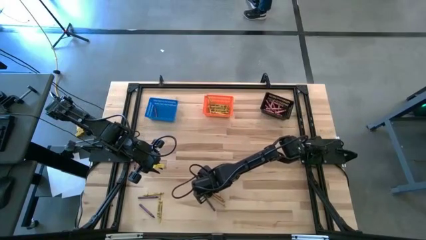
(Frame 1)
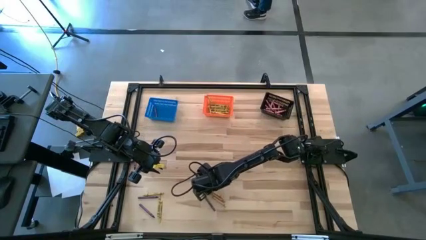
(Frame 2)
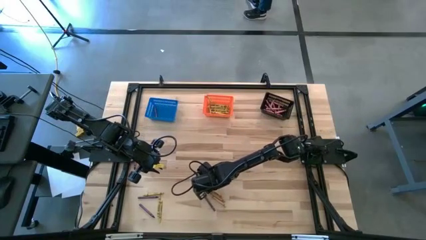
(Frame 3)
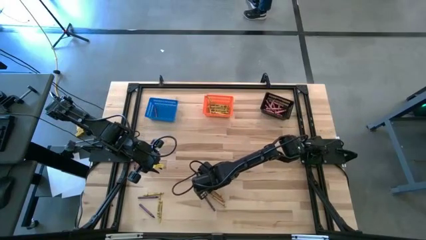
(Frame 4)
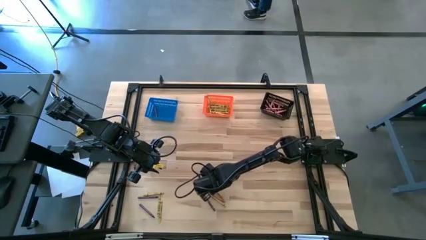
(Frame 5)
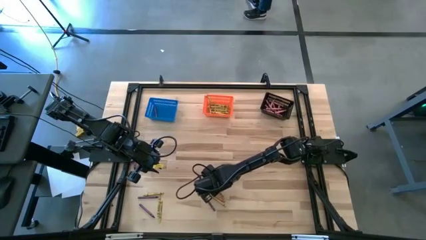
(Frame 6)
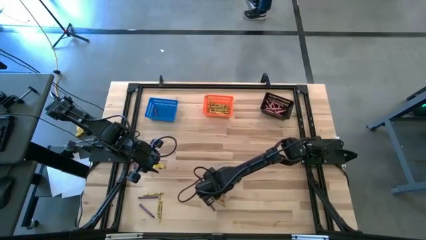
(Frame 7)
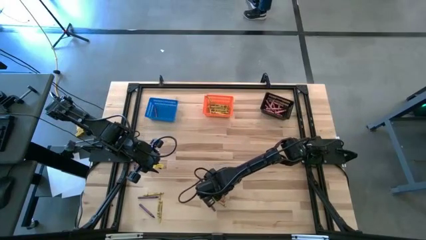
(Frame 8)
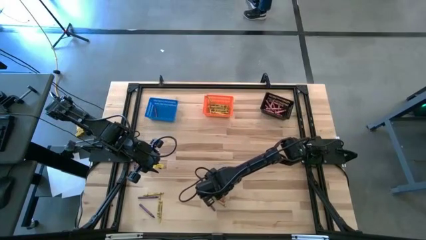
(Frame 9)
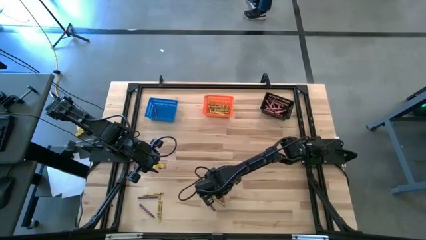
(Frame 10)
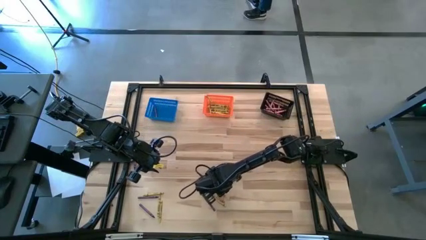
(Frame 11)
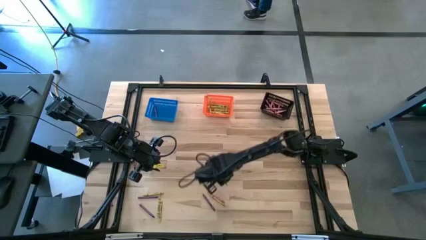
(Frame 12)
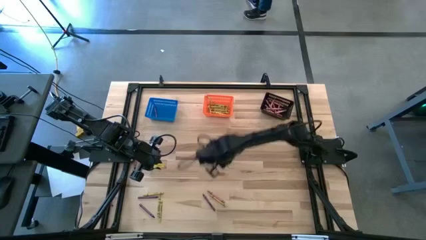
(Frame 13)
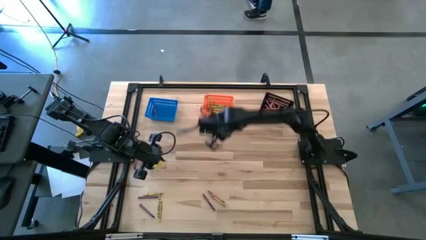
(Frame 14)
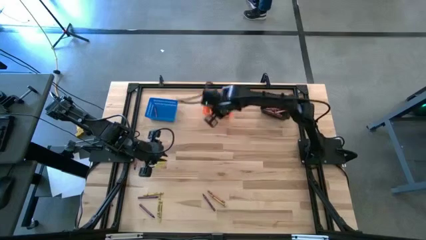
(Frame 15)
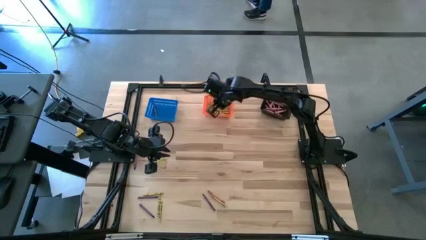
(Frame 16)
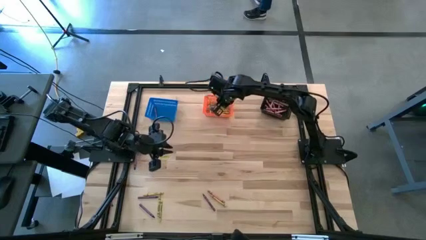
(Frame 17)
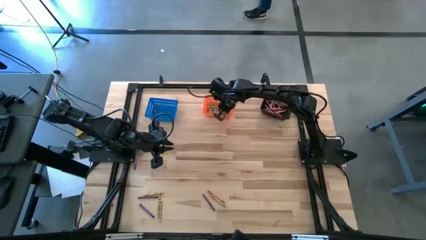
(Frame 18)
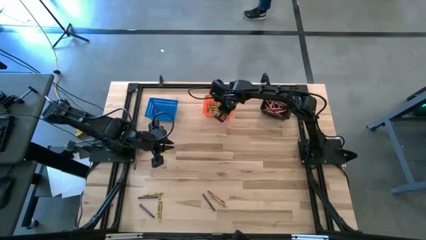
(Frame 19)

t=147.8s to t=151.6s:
Task: Sort crayons
Put the yellow crayon into the orange bin

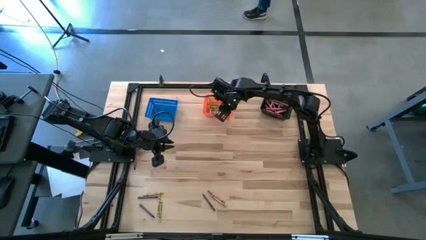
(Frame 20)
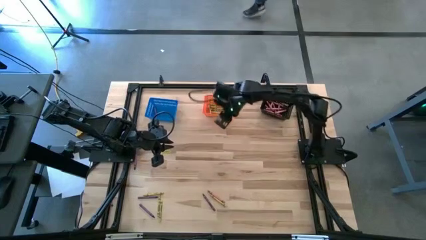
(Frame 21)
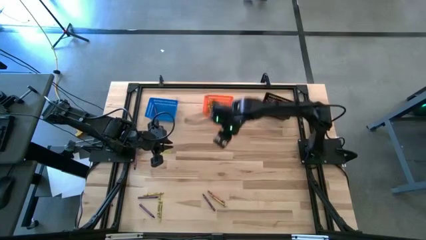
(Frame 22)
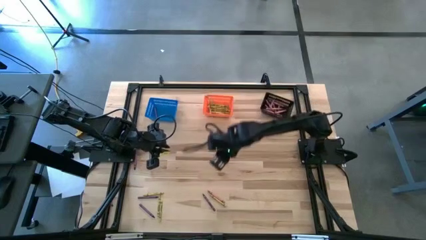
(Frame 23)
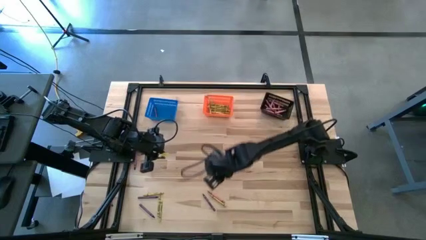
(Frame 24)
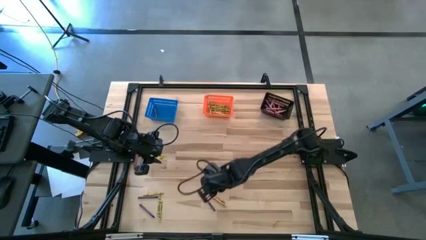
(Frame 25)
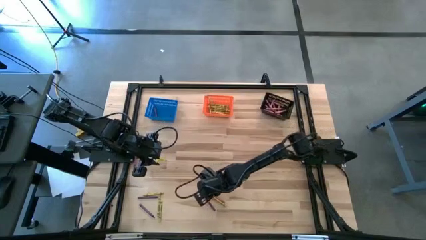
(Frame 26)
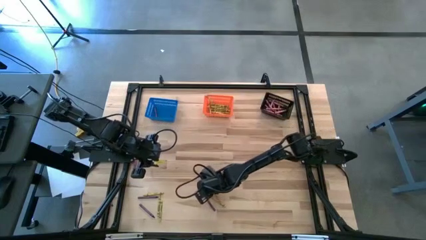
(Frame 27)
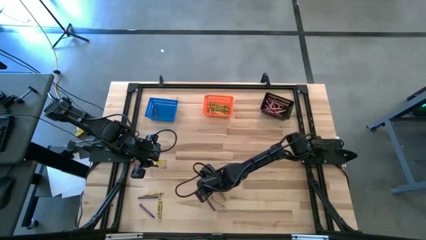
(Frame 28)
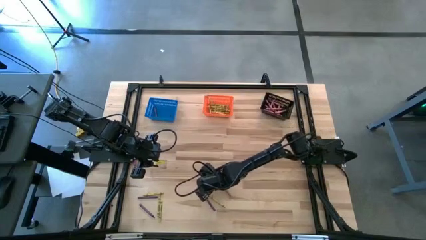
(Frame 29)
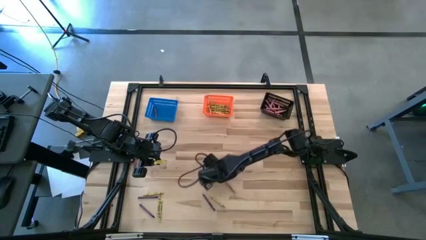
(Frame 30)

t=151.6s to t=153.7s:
Put the red crayon into the black bin

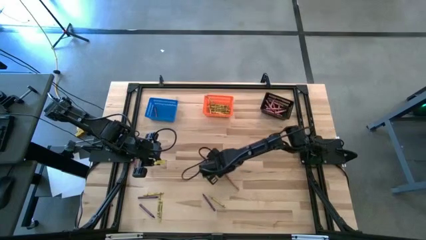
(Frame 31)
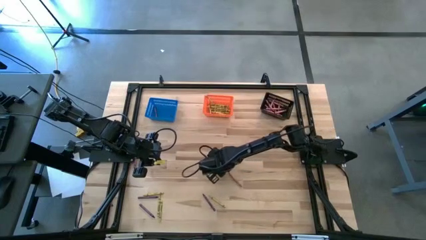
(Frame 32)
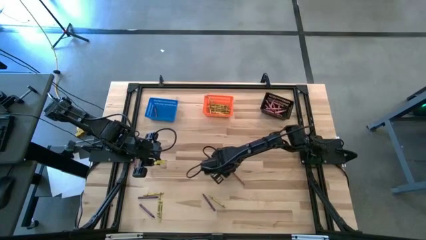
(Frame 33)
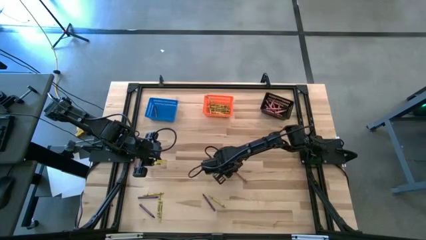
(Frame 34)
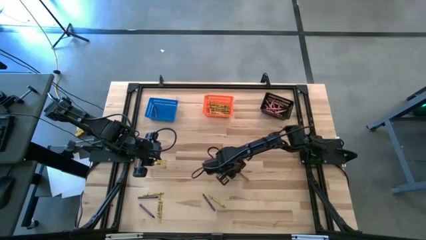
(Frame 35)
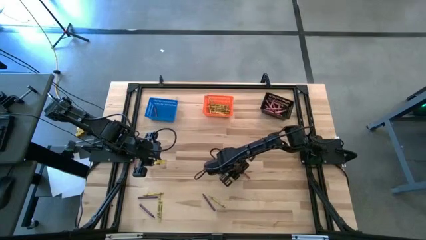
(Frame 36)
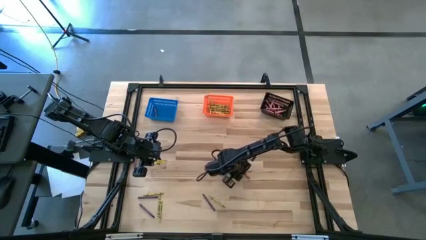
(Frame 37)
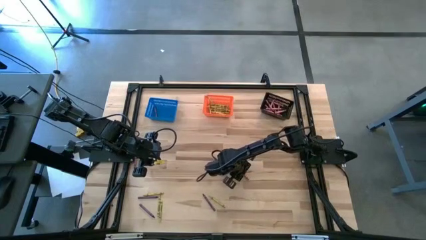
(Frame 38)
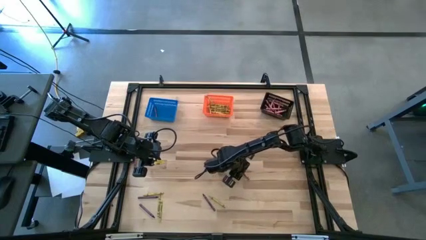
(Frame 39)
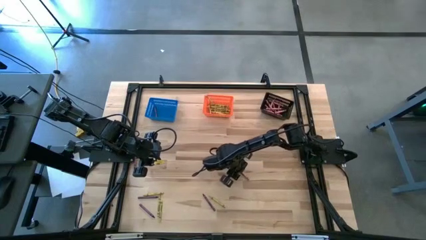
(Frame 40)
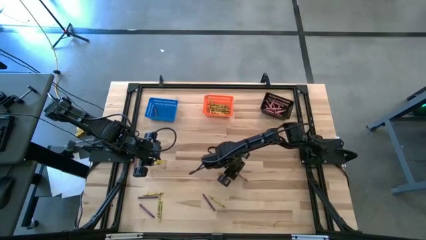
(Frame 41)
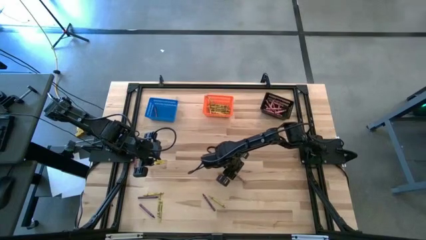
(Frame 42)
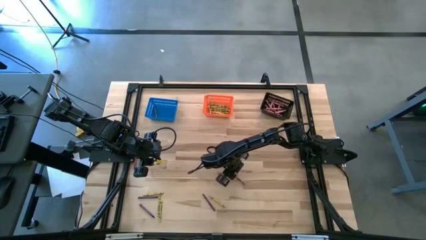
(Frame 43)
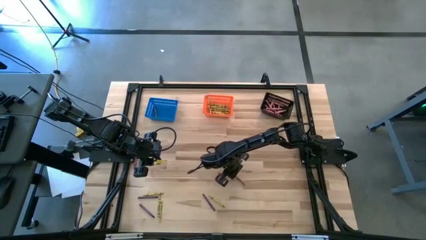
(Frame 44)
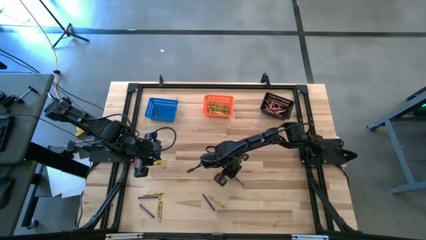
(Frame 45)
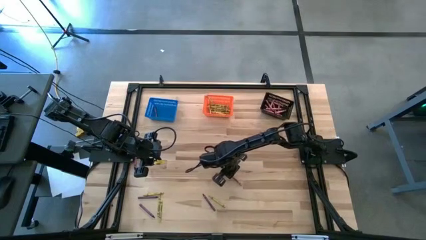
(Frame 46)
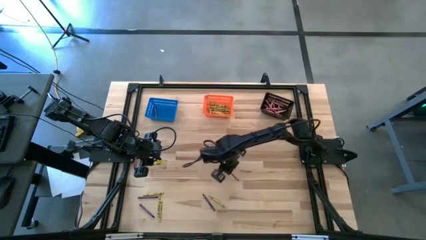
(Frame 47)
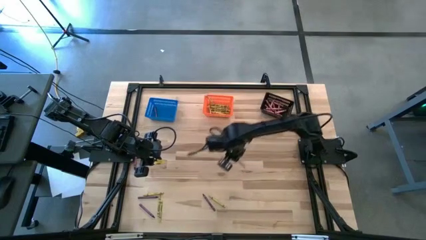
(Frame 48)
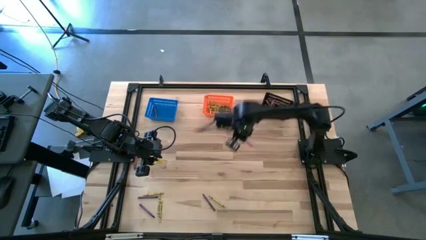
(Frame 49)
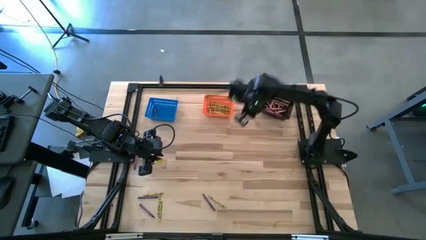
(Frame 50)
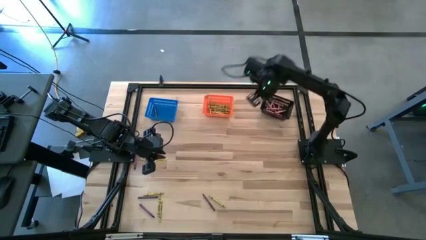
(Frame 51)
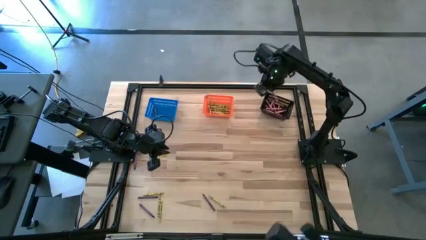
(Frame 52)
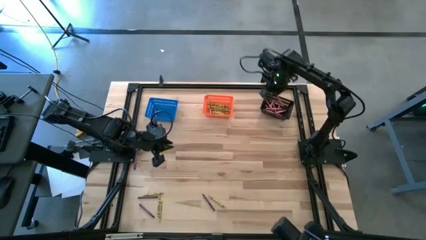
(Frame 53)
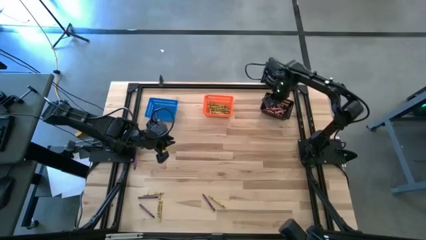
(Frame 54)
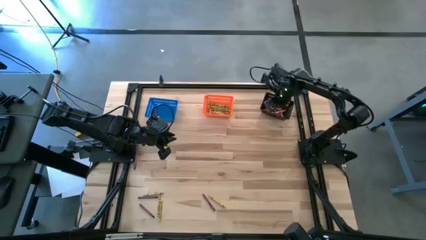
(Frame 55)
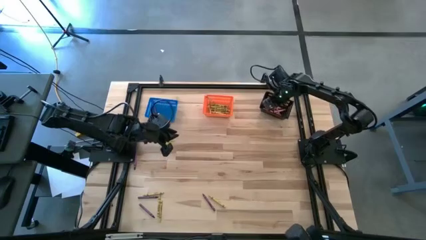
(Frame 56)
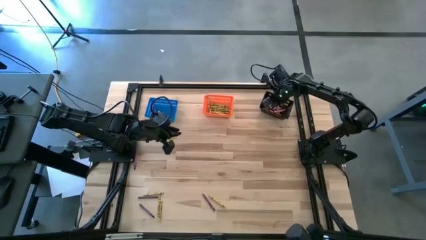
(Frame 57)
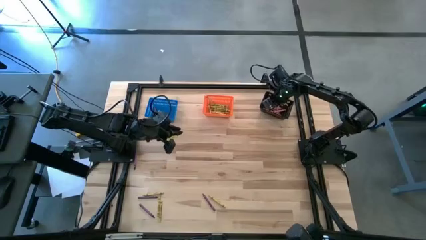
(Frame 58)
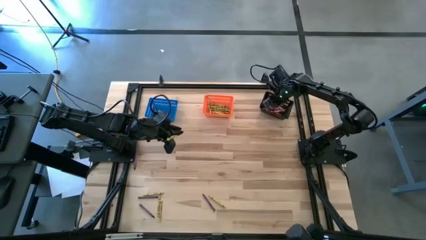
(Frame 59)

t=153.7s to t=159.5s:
Put the red crayon into the black bin

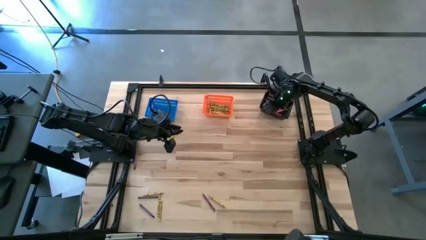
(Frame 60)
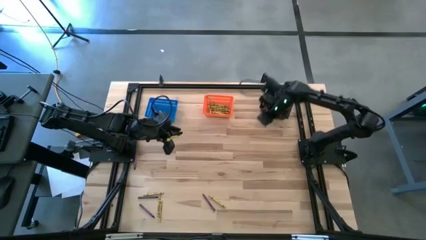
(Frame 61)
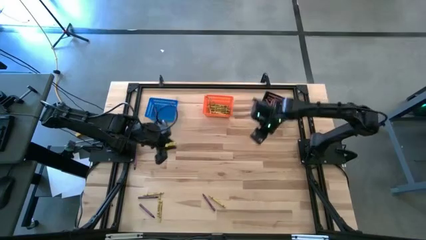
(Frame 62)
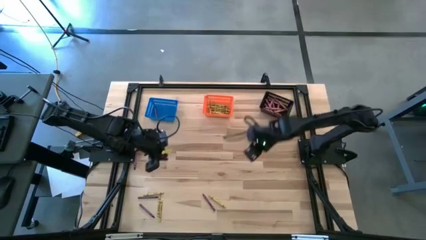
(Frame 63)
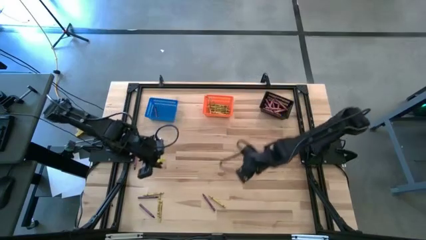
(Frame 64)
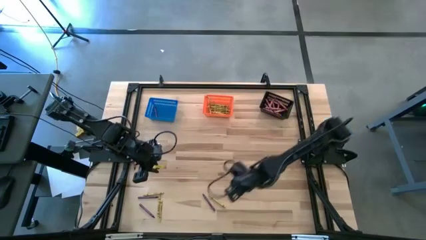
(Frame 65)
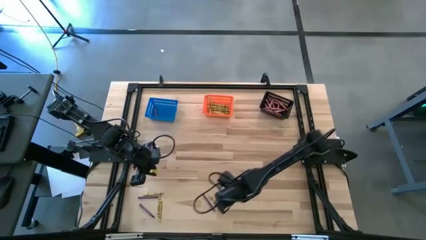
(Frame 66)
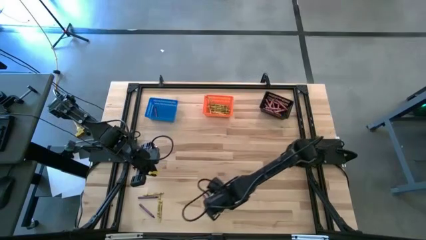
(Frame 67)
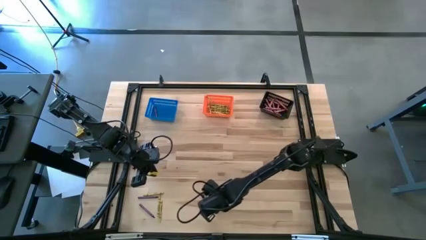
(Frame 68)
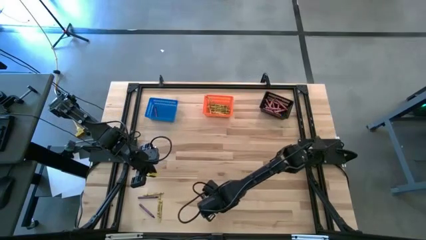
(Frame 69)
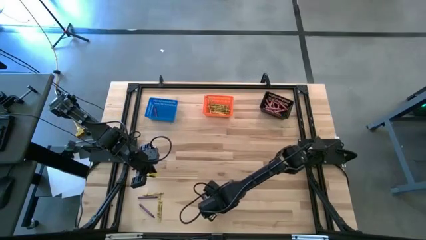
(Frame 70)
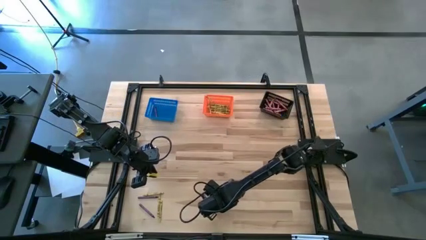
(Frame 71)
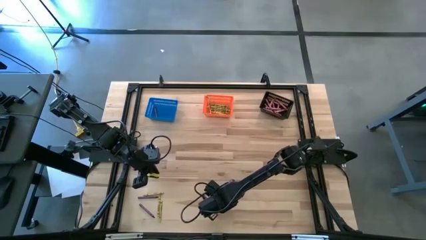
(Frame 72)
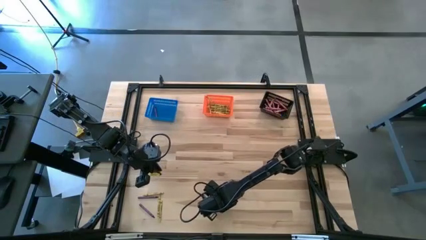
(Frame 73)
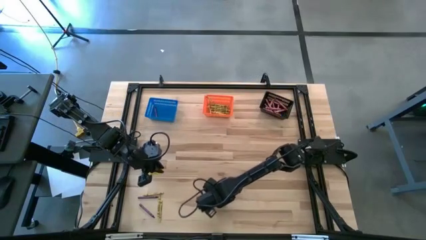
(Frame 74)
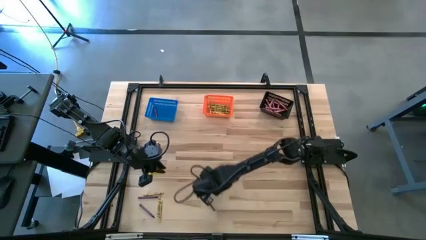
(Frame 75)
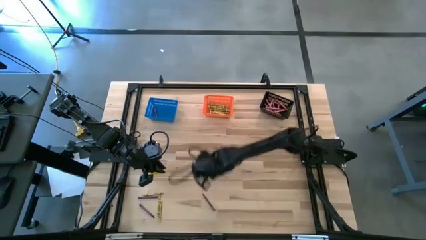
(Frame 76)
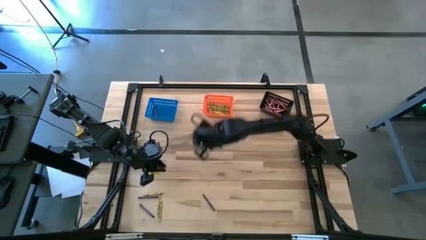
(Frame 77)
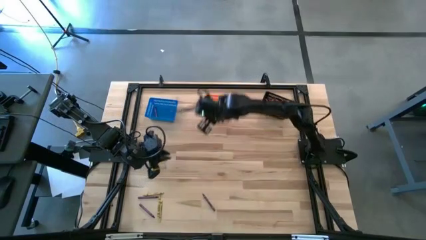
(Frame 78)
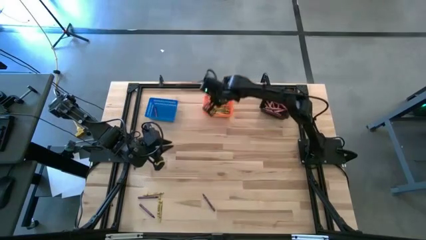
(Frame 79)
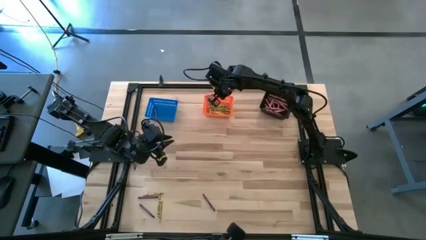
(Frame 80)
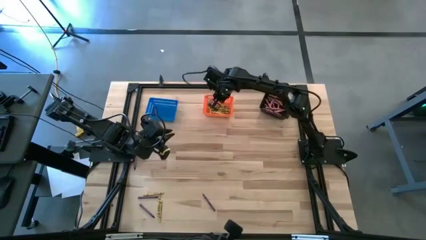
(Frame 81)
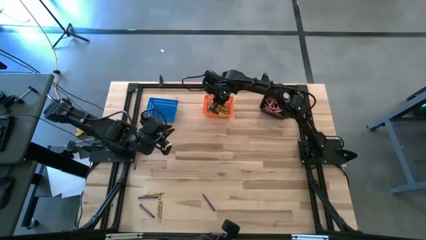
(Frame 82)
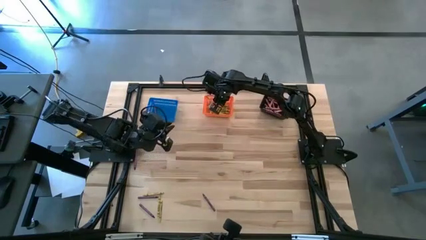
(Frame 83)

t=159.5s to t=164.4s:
Put the yellow crayon into the orange bin

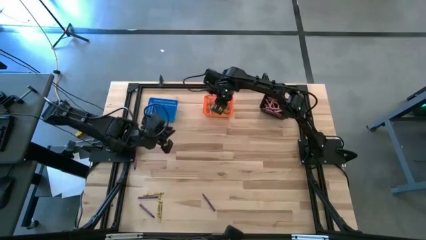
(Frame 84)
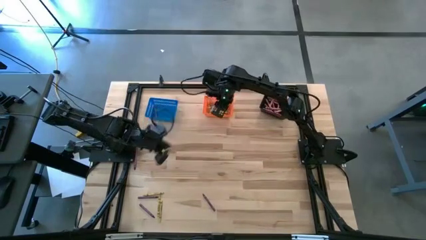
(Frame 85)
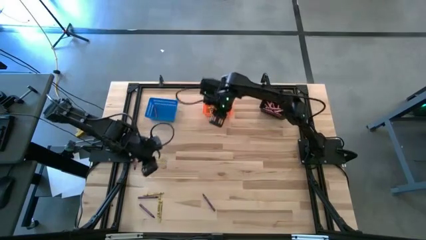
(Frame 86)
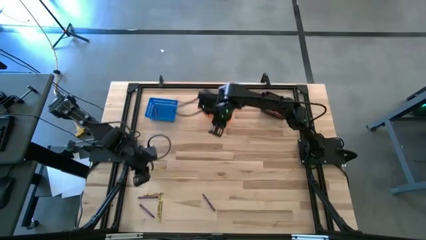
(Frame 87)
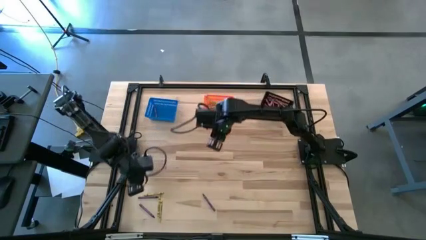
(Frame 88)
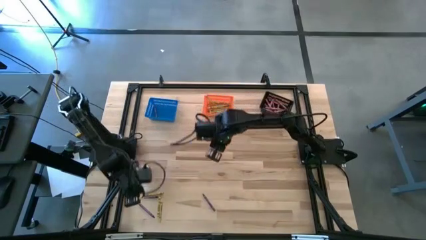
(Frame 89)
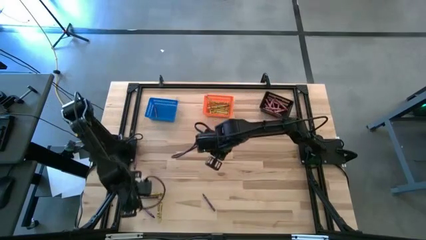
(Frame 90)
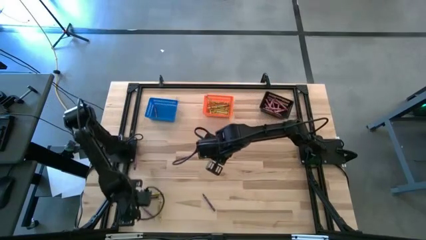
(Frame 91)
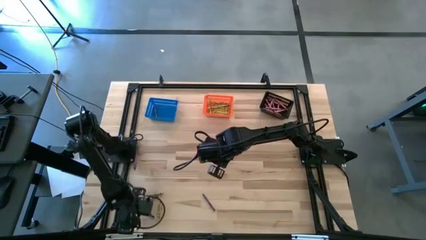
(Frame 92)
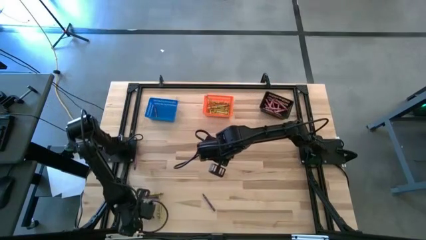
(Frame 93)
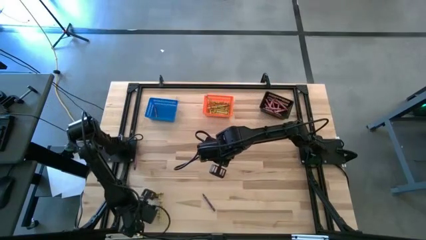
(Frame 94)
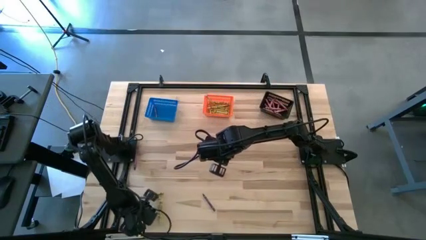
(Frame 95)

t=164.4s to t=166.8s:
Put the violet crayon into the blue bin
